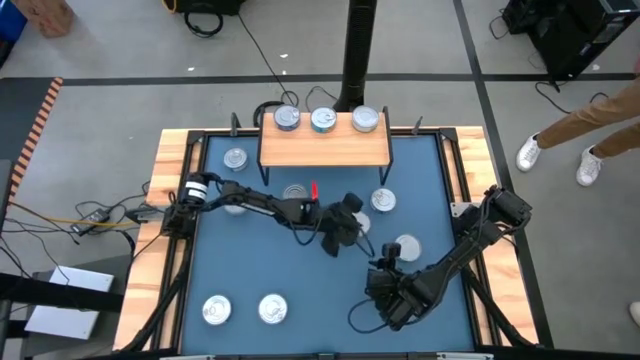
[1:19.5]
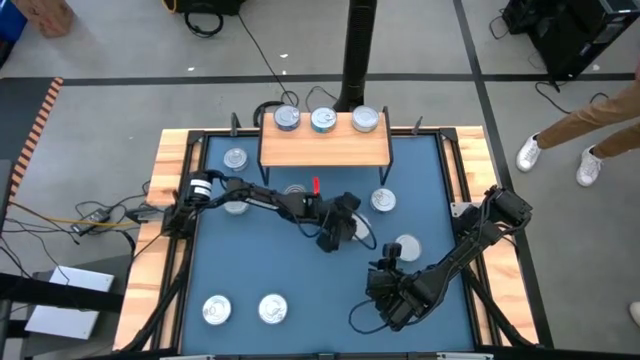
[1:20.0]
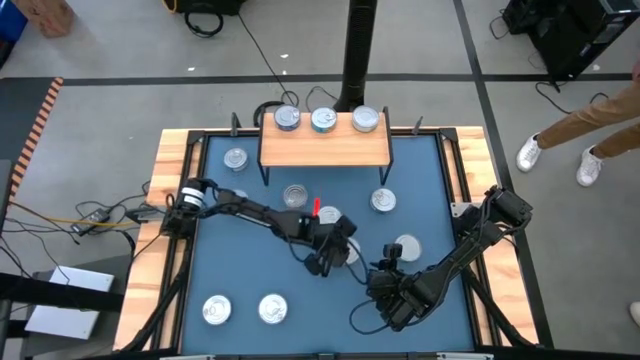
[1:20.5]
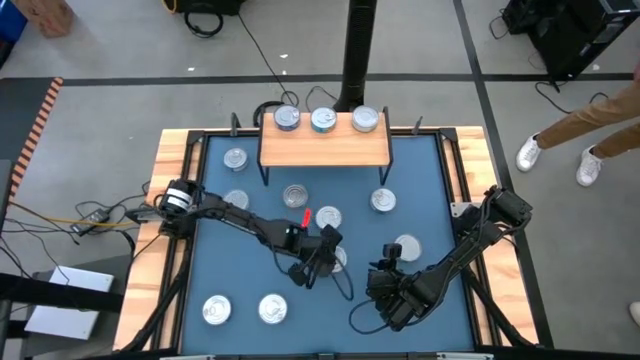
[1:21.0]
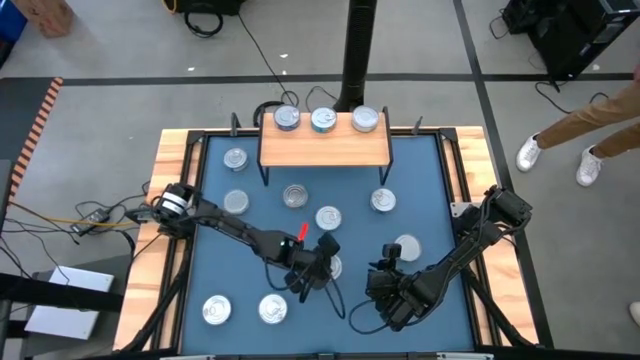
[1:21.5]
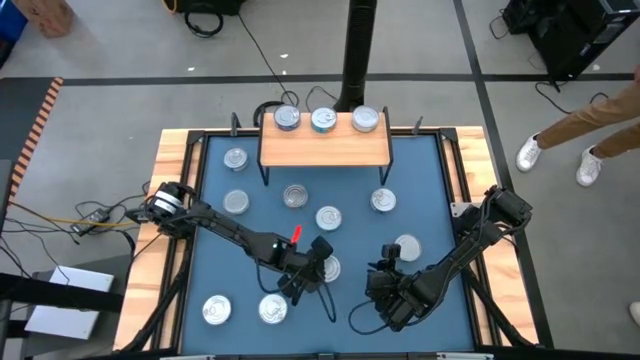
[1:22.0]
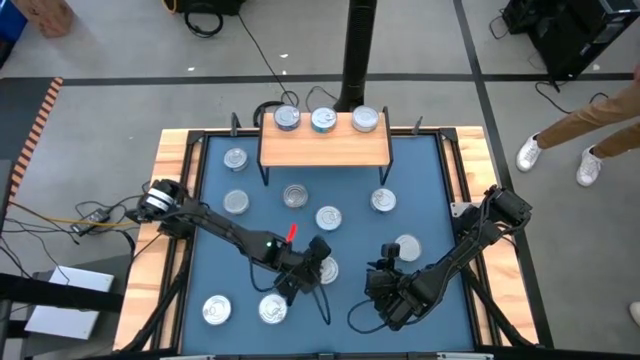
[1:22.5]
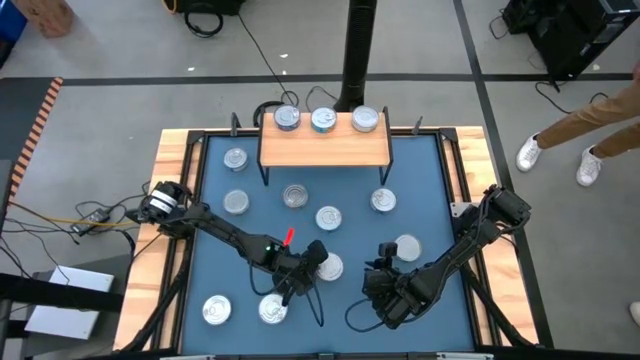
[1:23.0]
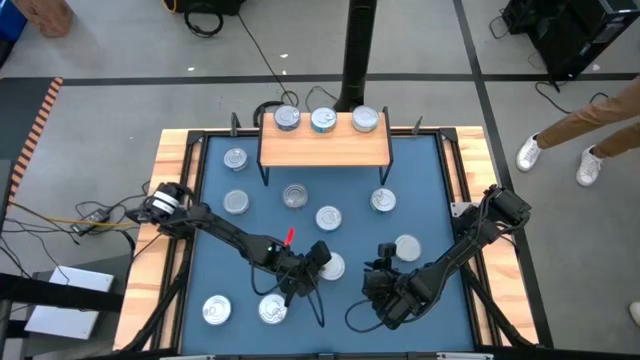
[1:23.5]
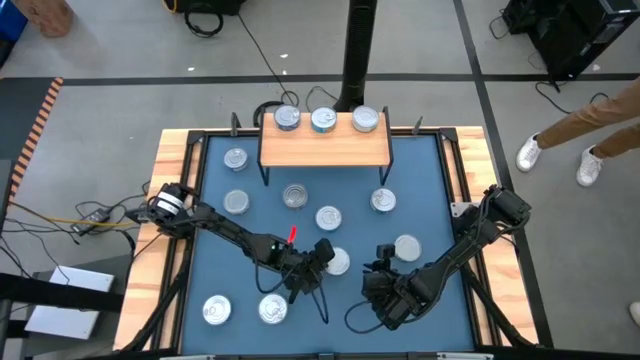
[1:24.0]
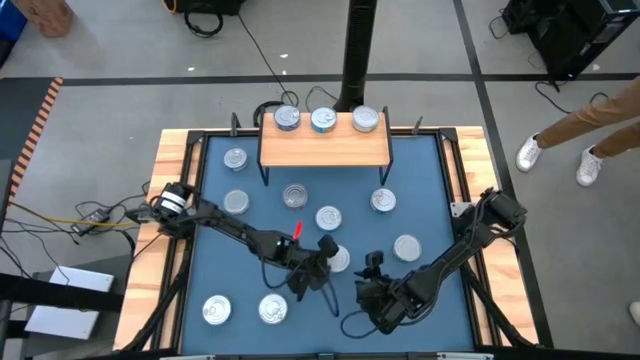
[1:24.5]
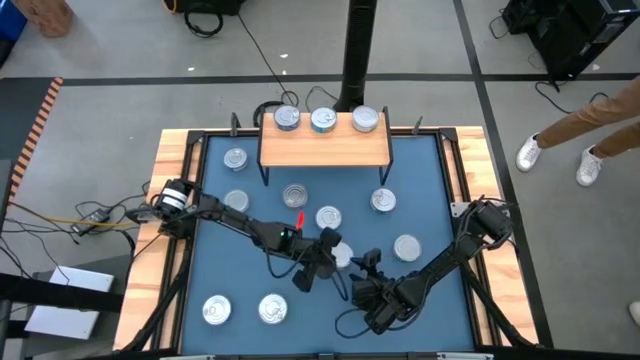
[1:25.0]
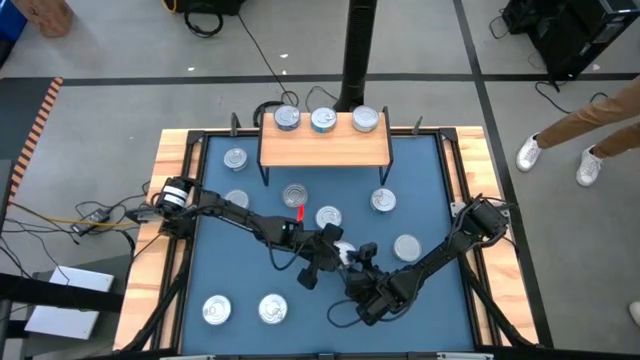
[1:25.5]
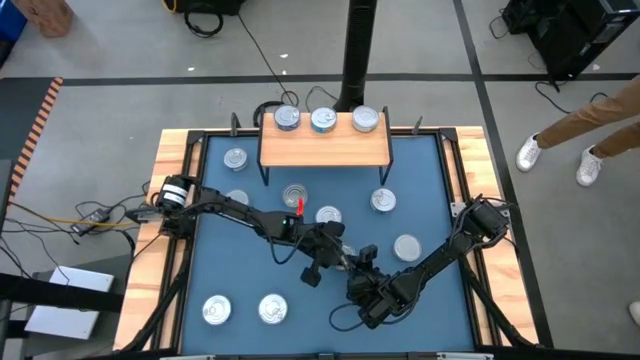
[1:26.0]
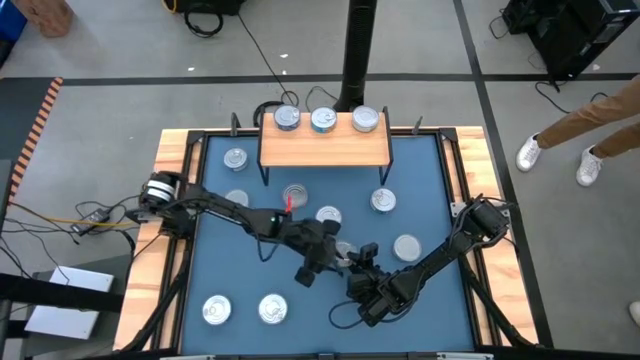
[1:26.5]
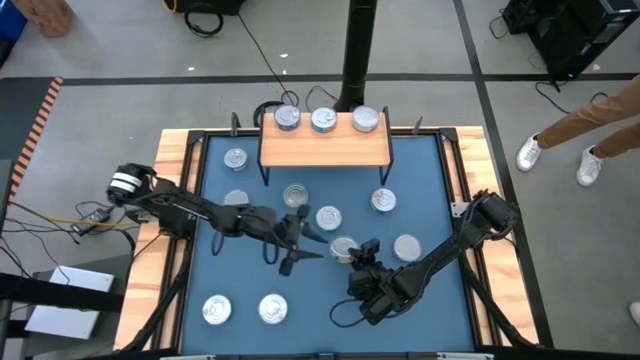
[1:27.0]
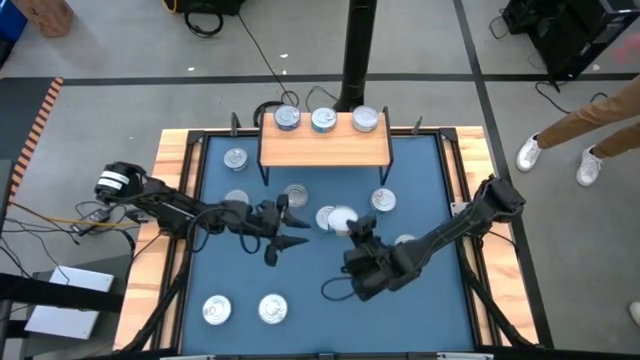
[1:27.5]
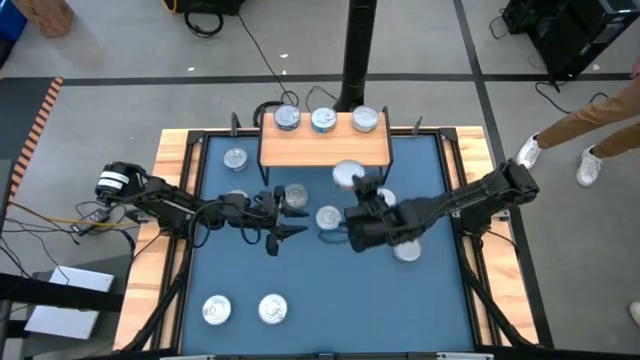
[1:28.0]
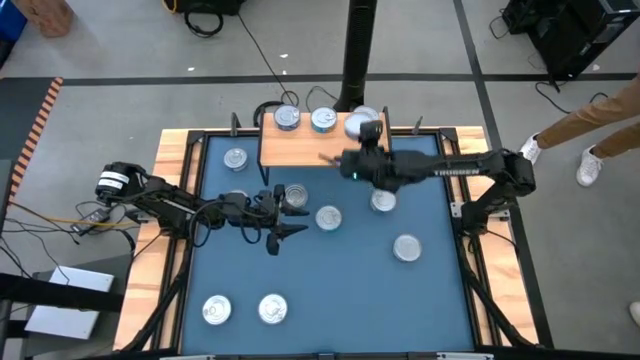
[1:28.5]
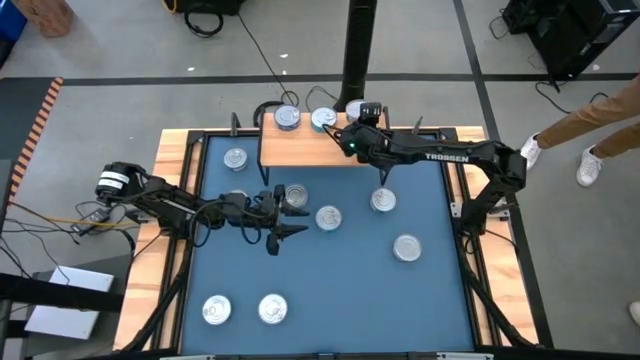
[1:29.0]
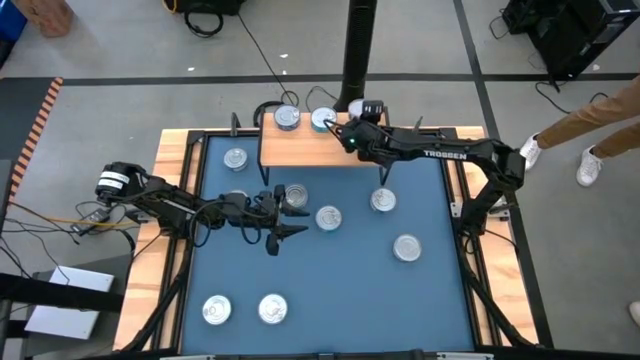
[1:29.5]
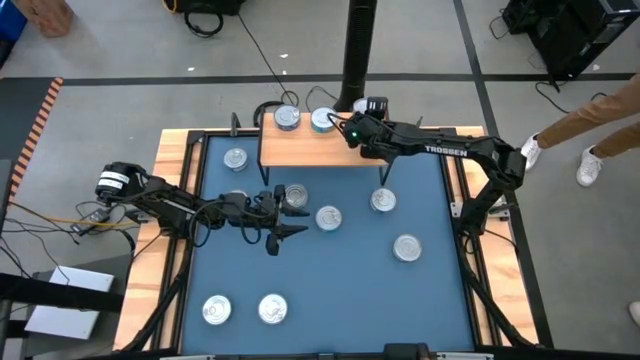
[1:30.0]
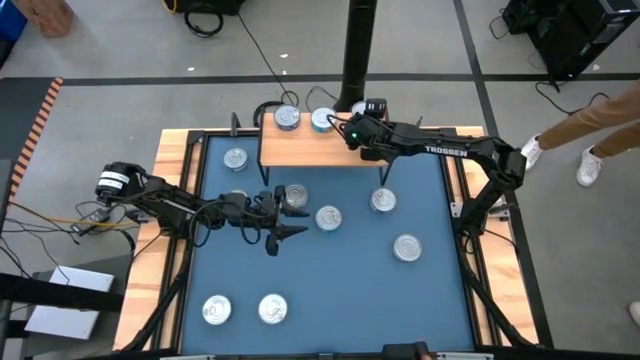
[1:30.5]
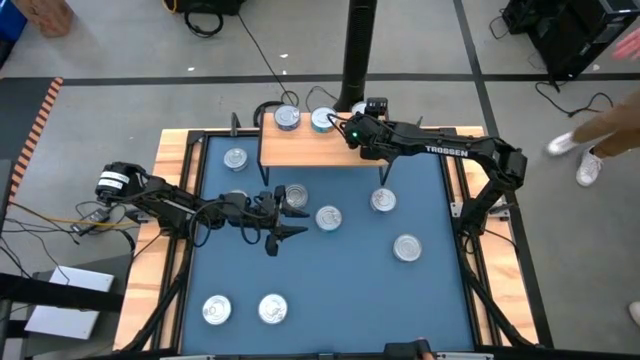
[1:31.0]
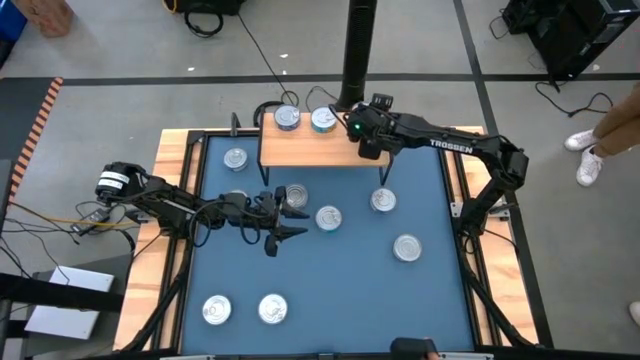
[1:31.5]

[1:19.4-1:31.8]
Task: Stack canned seafood by type on shelf
Stack the green tuna can on top of the green tuna can on the shelf

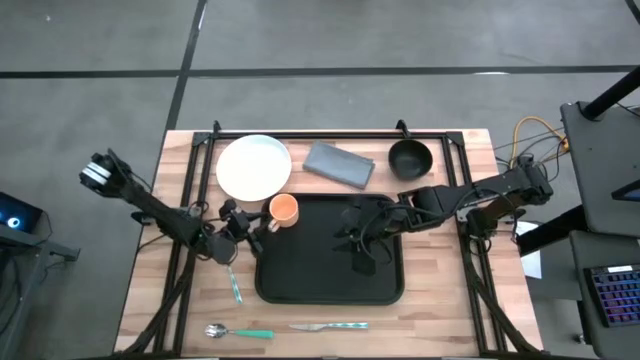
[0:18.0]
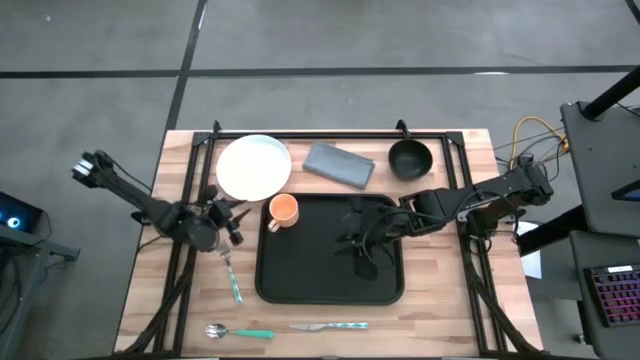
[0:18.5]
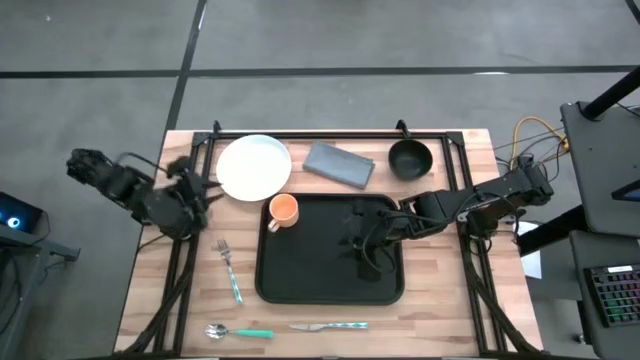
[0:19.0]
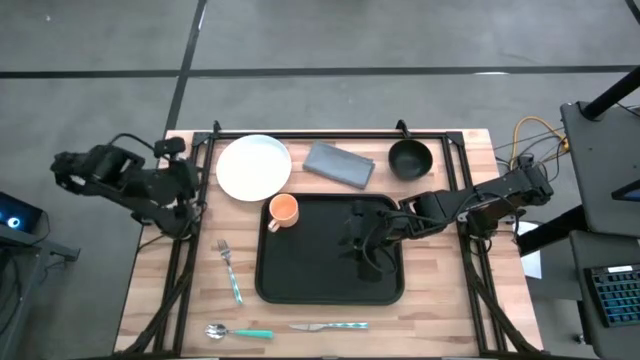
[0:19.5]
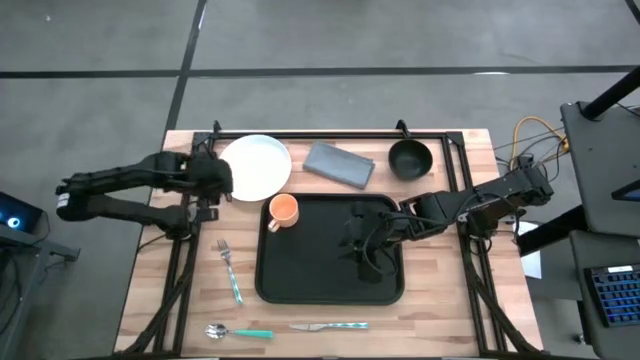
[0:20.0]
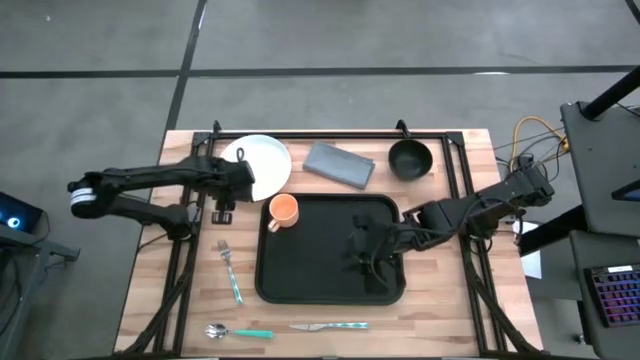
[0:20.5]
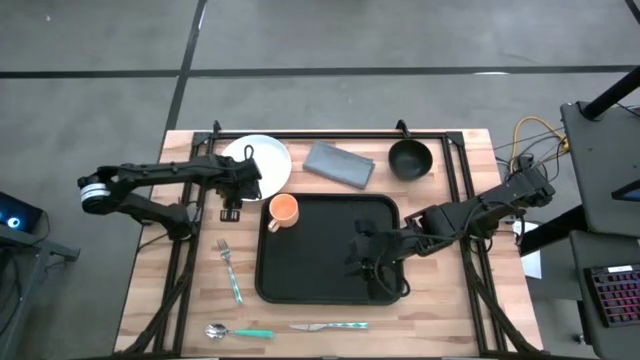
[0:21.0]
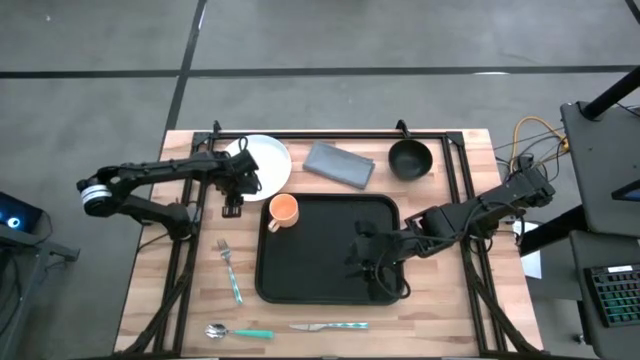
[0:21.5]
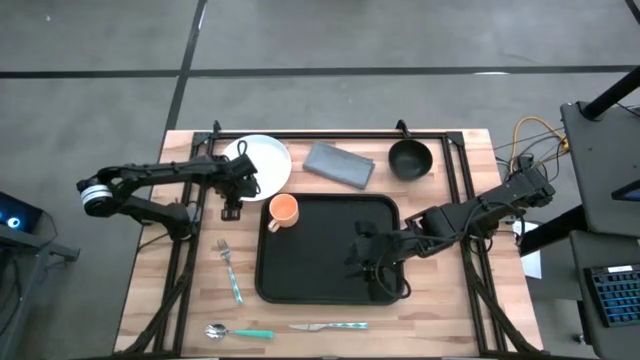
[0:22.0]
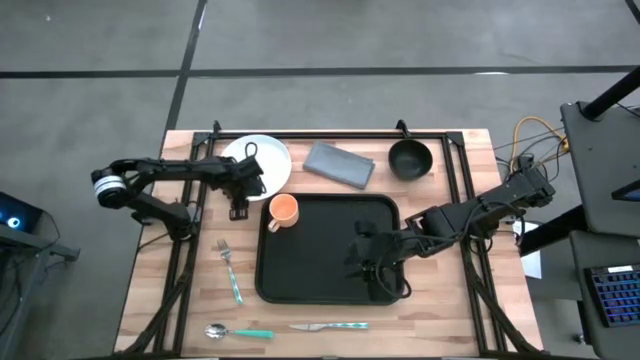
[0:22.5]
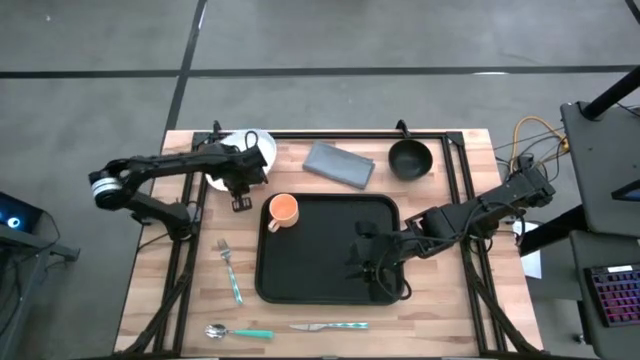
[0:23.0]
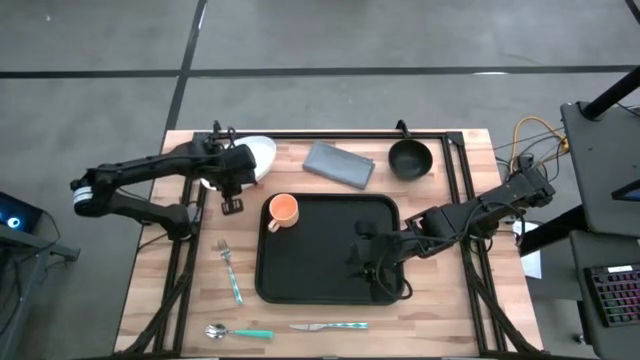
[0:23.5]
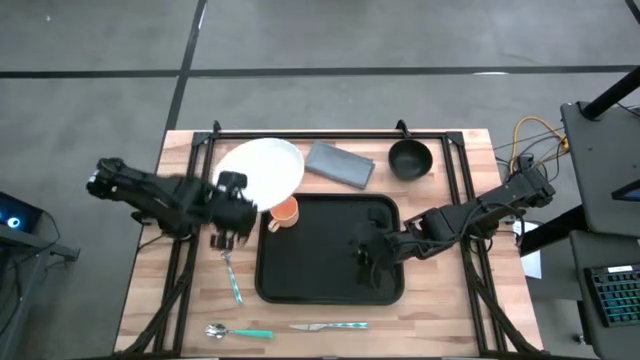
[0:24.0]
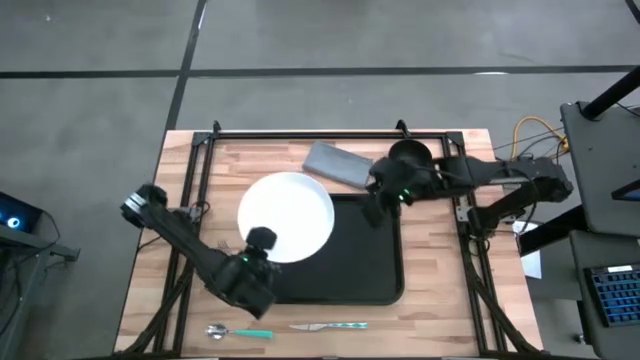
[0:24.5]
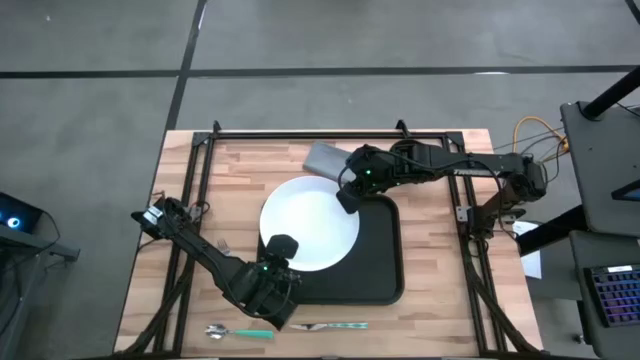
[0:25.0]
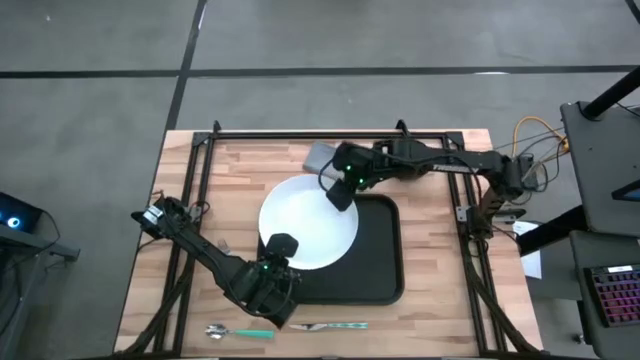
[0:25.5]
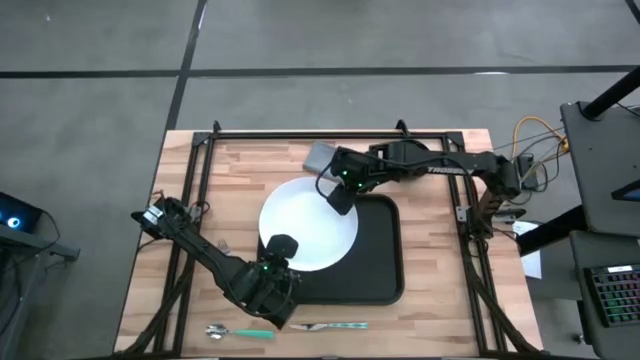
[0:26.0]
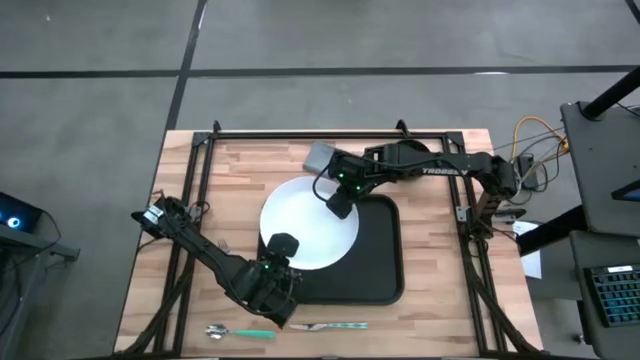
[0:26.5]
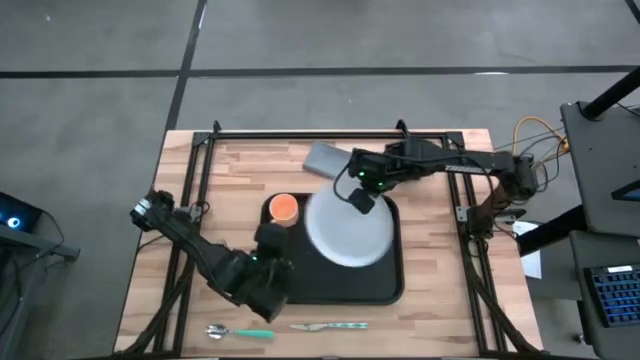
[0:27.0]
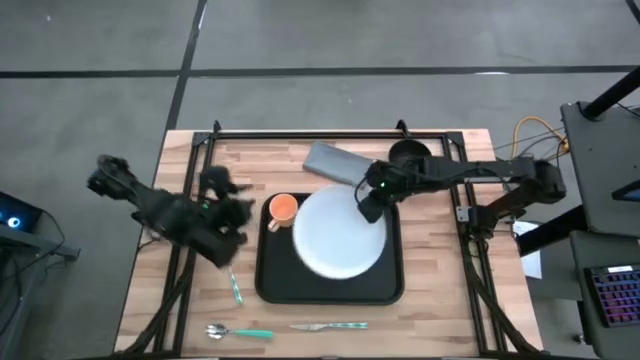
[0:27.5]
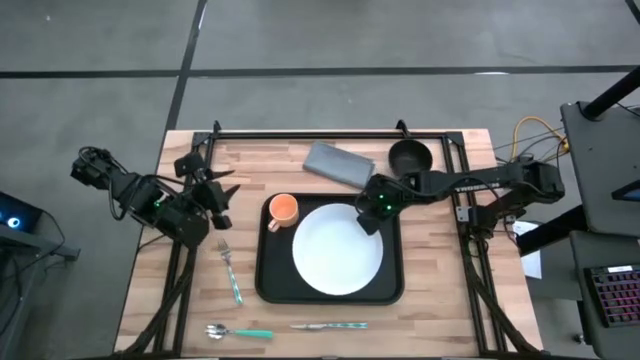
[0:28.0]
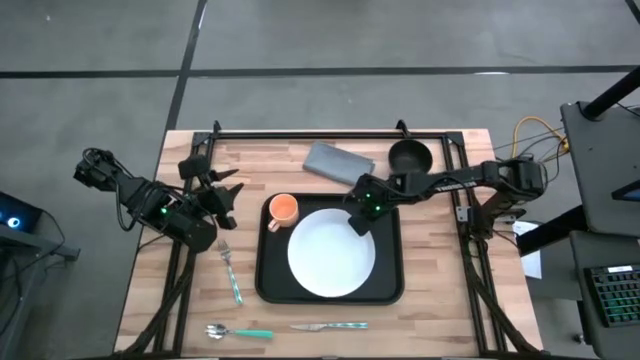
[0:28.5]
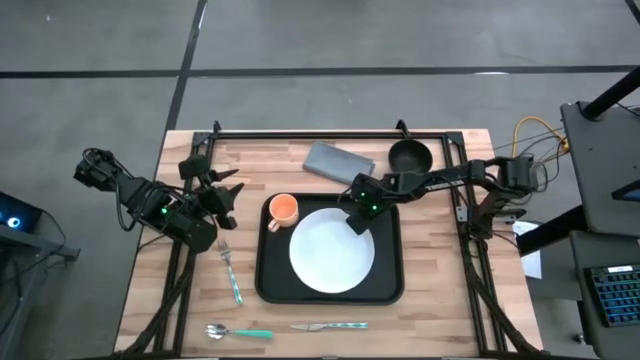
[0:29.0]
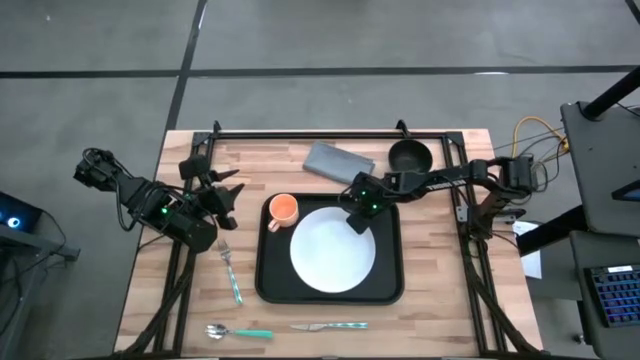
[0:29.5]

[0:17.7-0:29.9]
Task: Set up tray
Put the white plate on the black serving tray below the orange mug
